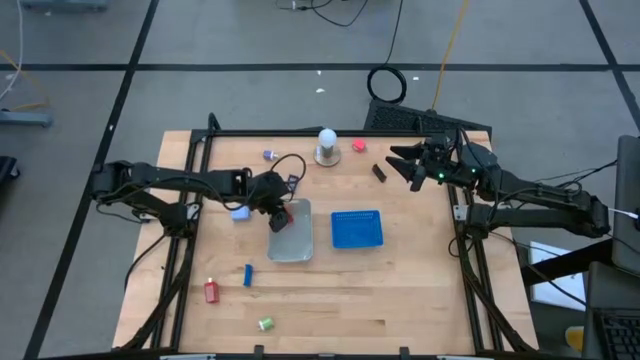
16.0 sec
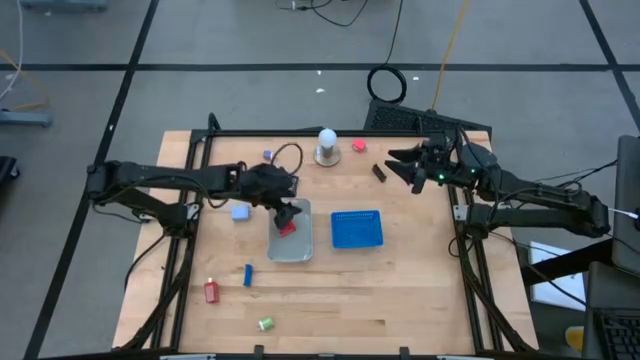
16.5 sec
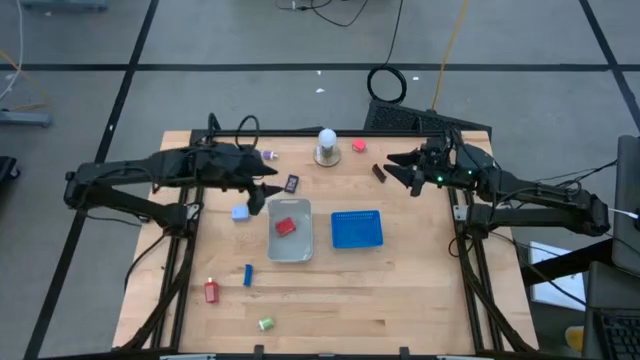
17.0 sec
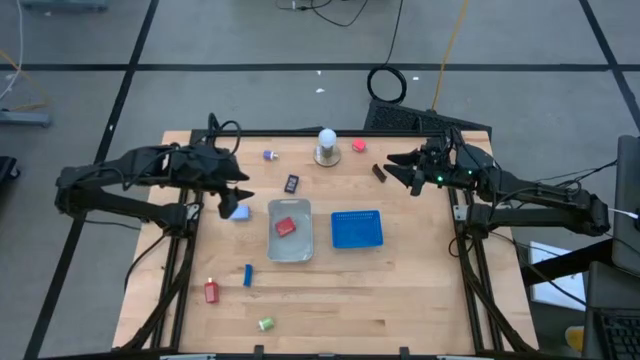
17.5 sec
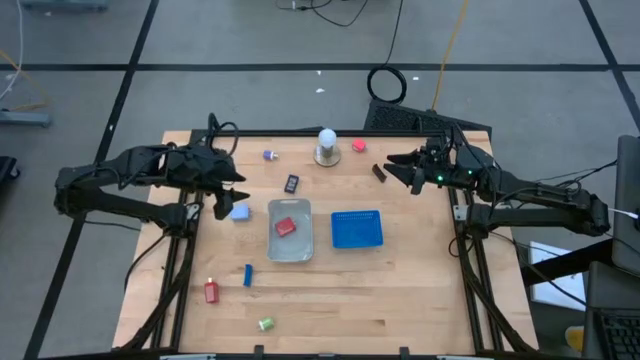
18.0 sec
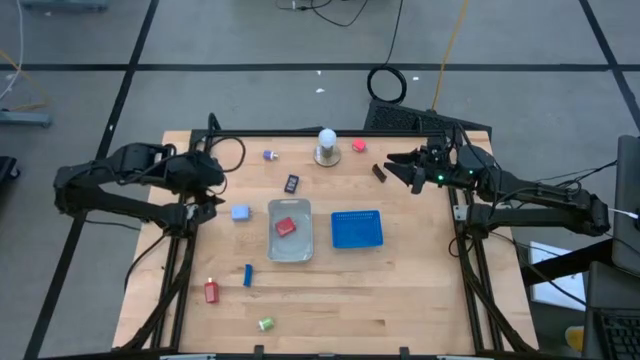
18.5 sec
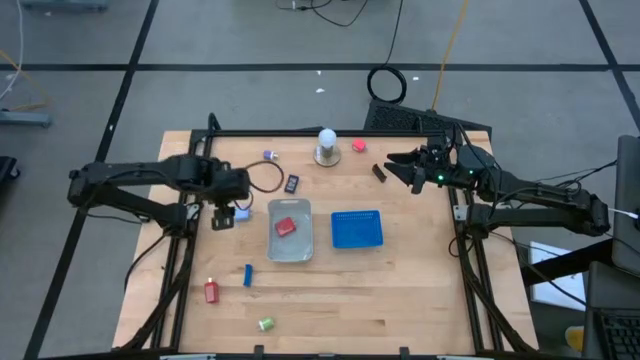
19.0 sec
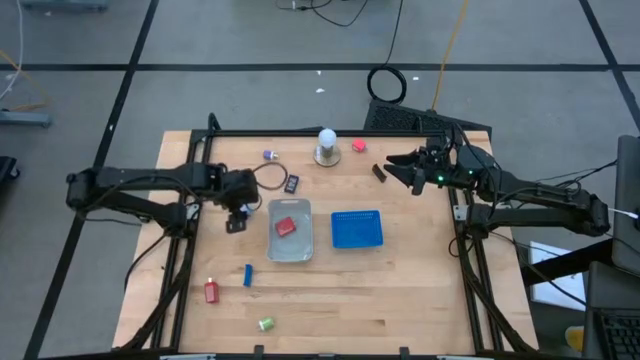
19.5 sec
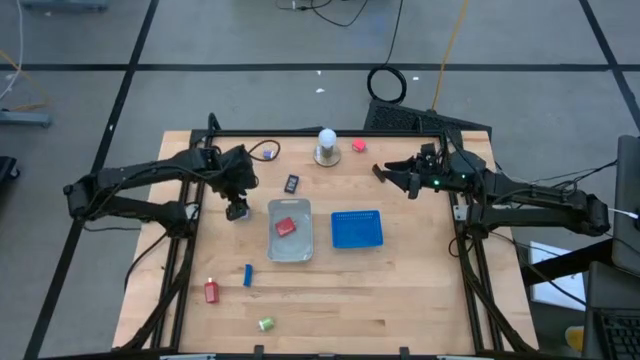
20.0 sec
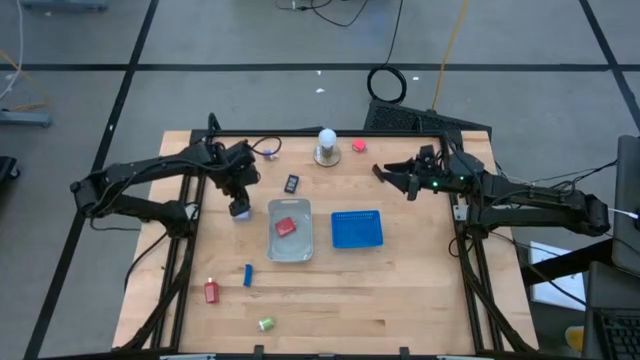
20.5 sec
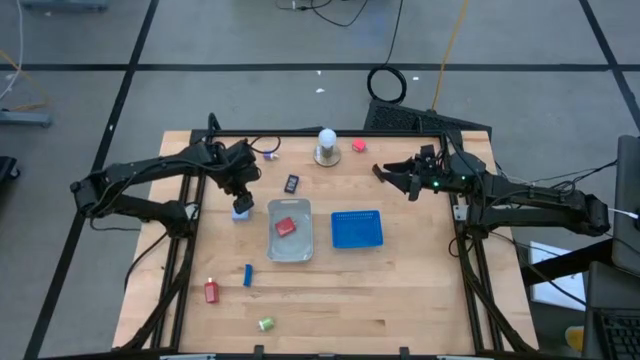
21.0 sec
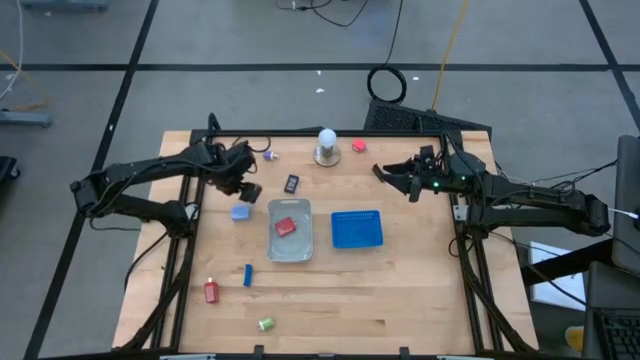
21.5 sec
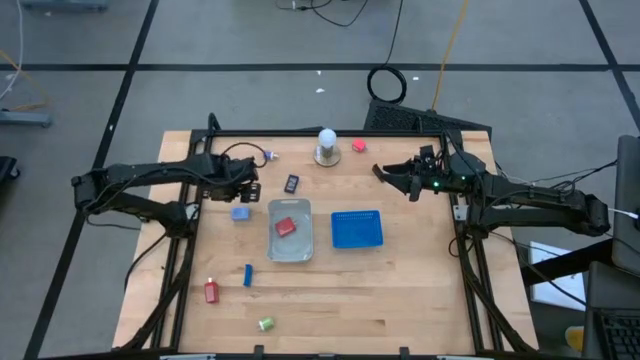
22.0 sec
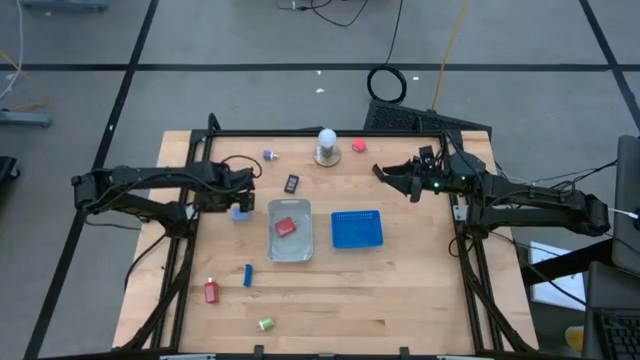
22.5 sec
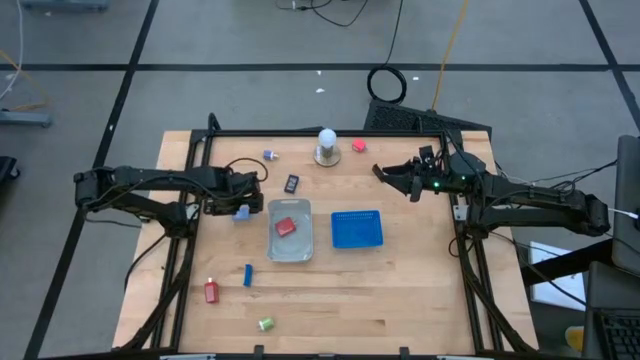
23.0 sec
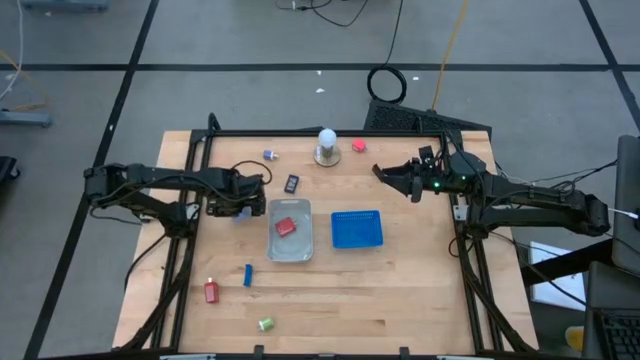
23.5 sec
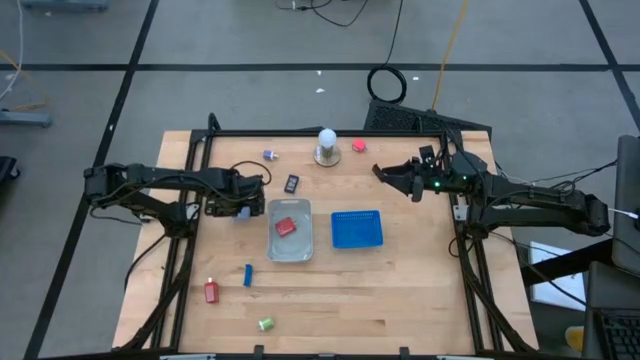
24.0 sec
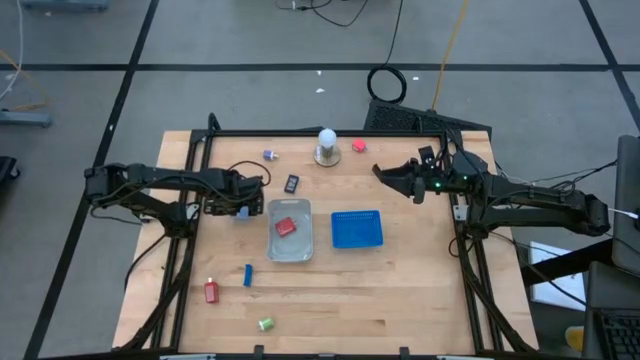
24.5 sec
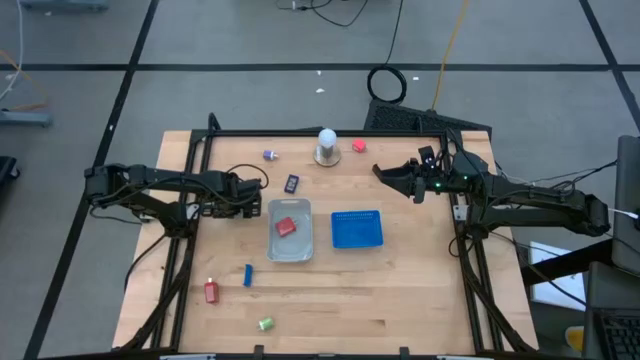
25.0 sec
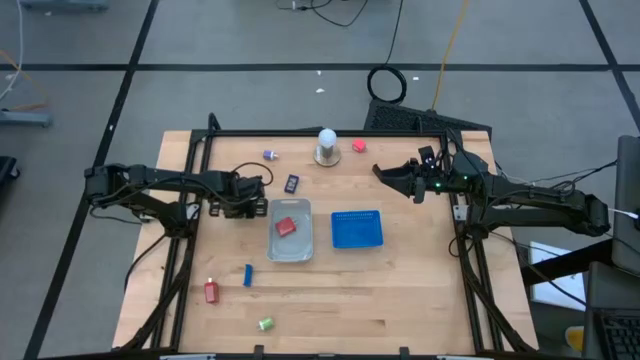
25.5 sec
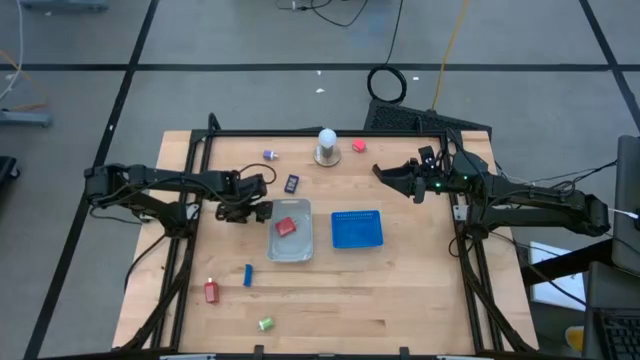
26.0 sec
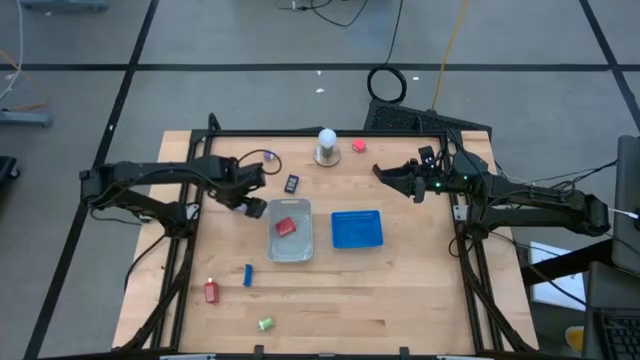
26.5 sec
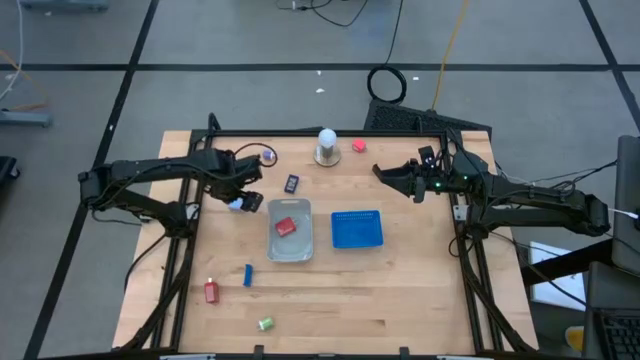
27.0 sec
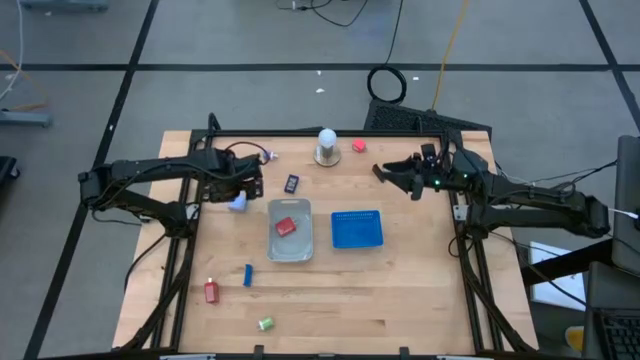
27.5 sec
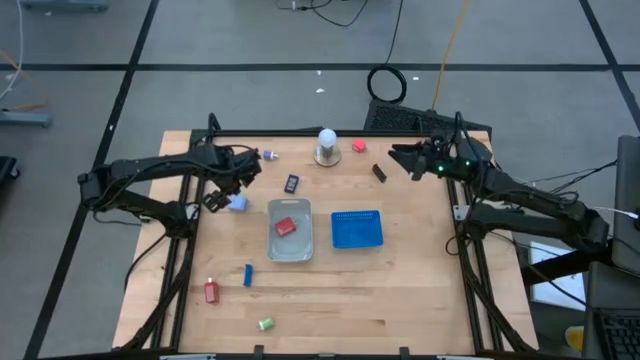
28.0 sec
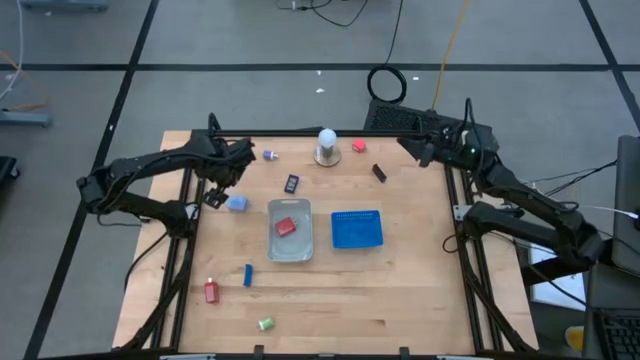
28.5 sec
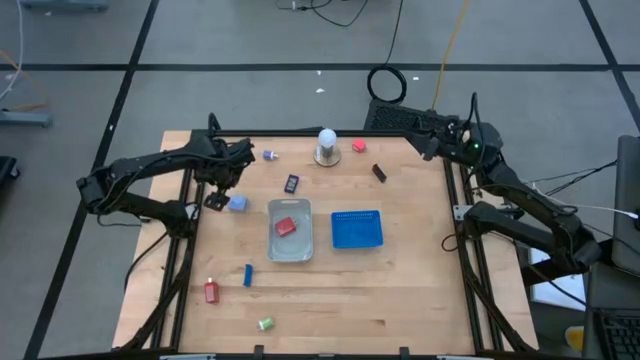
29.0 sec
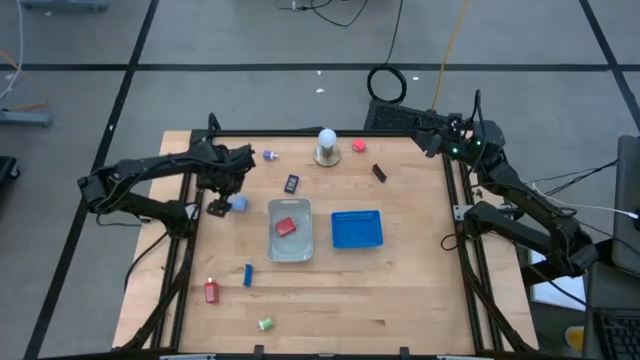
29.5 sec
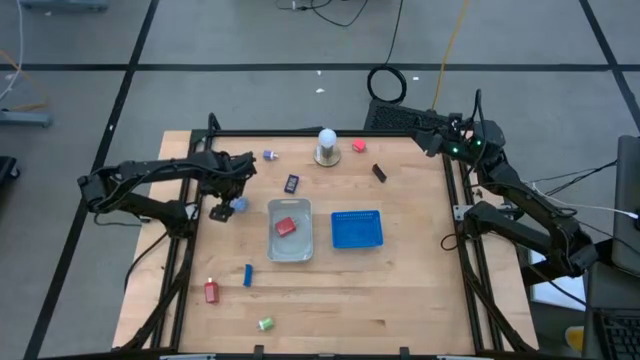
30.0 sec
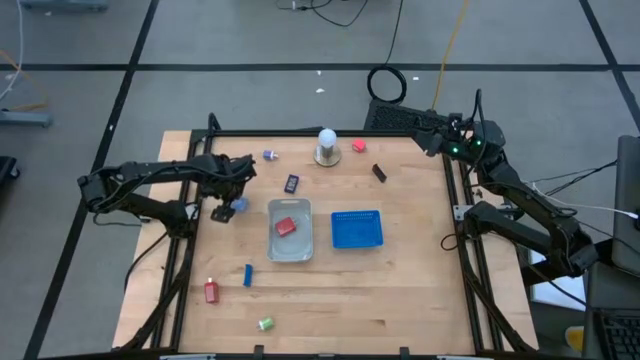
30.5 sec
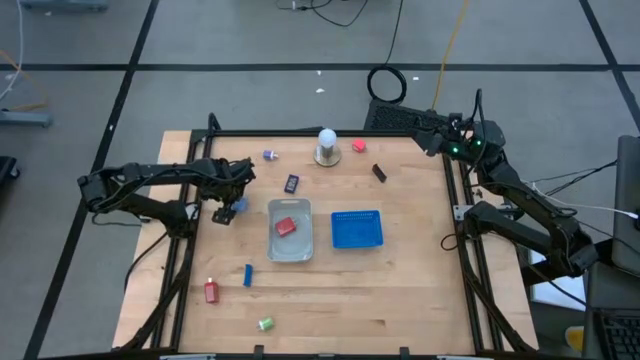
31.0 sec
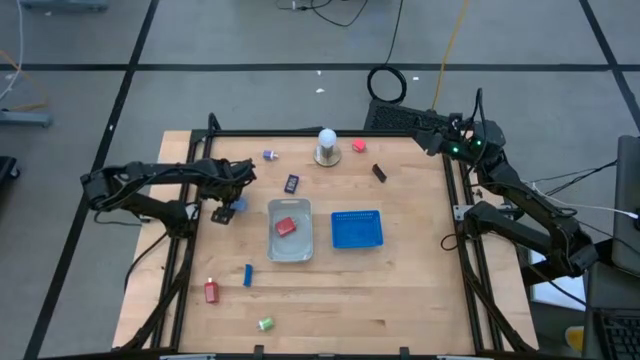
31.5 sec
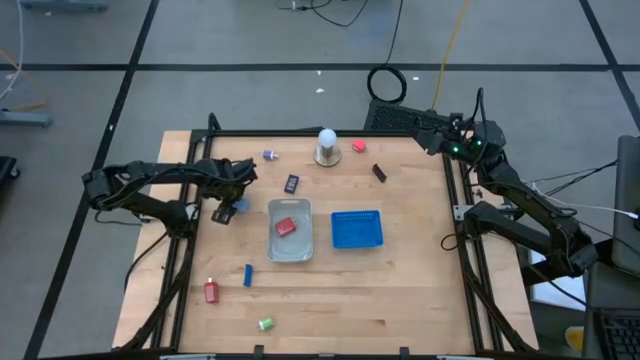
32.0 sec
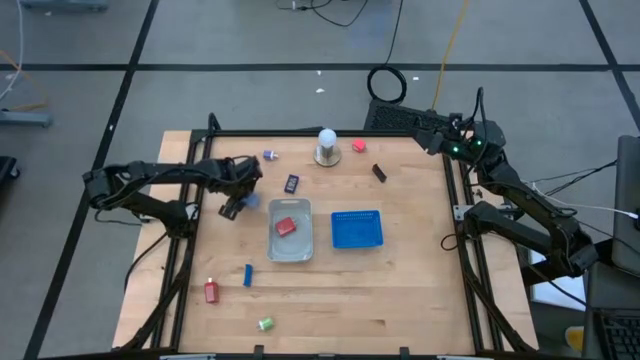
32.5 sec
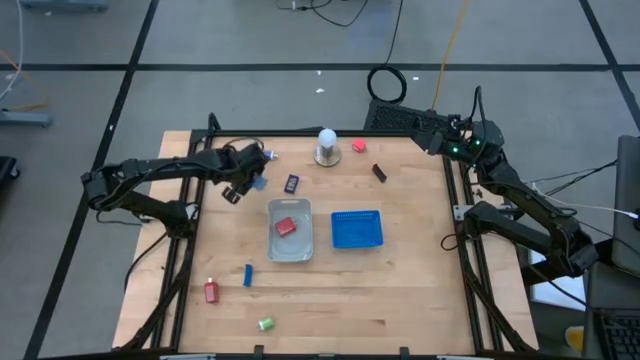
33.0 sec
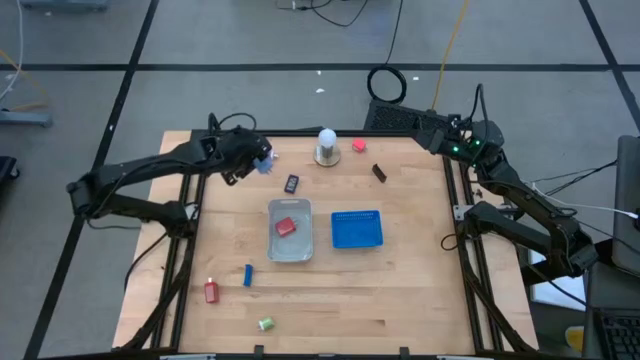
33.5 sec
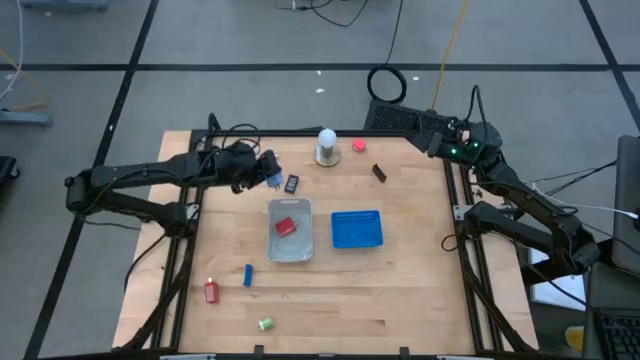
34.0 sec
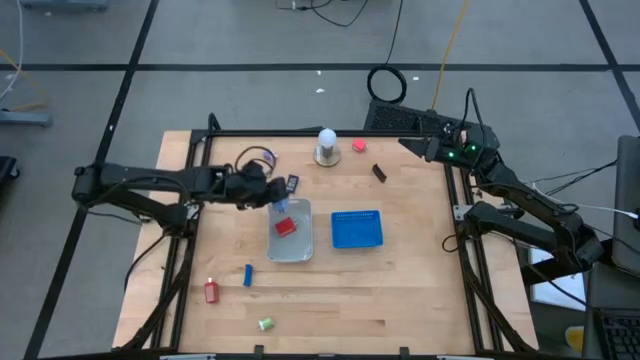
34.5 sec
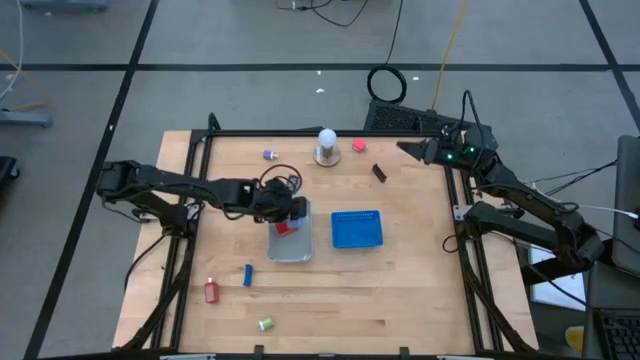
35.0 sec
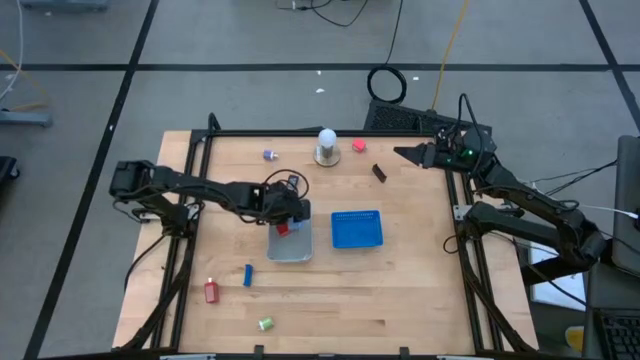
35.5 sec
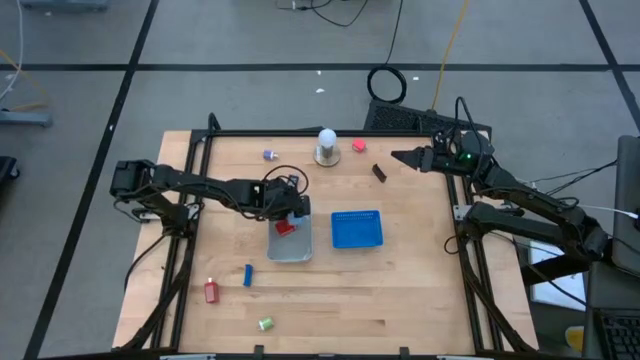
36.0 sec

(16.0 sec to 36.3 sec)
Task: Pick & Place Office items
Put the blue charger adapter into the gray bin

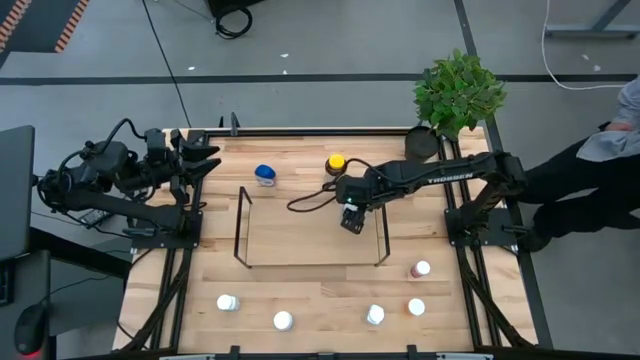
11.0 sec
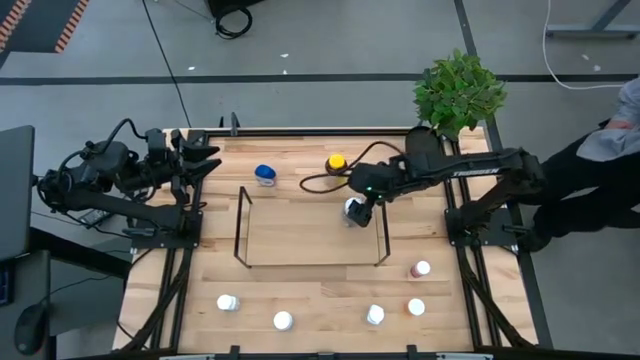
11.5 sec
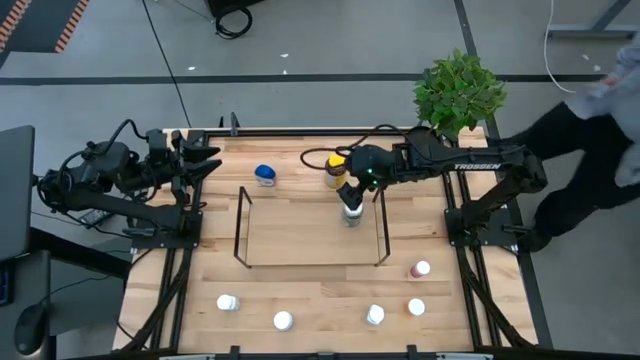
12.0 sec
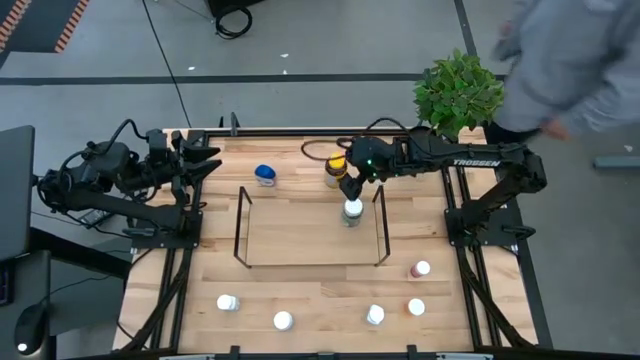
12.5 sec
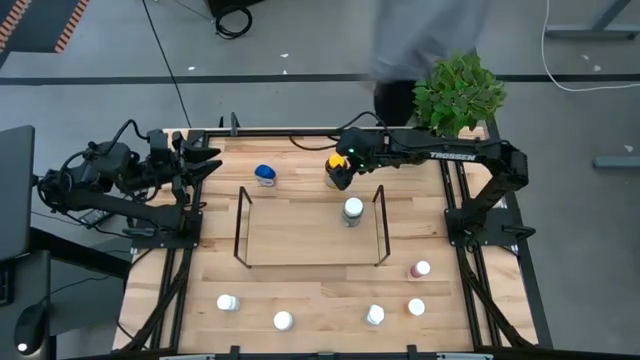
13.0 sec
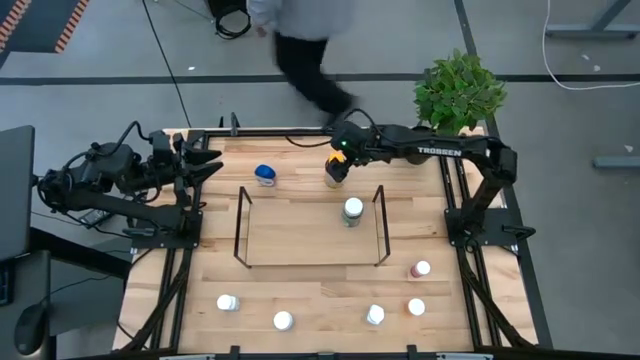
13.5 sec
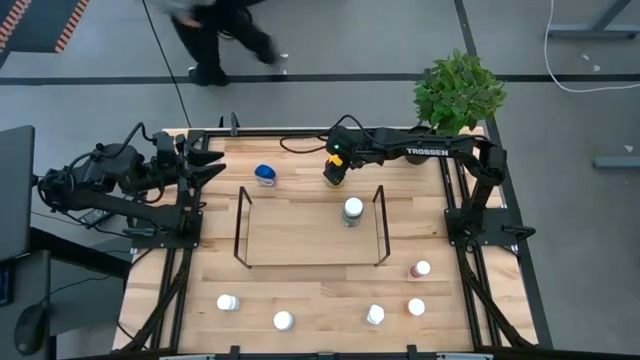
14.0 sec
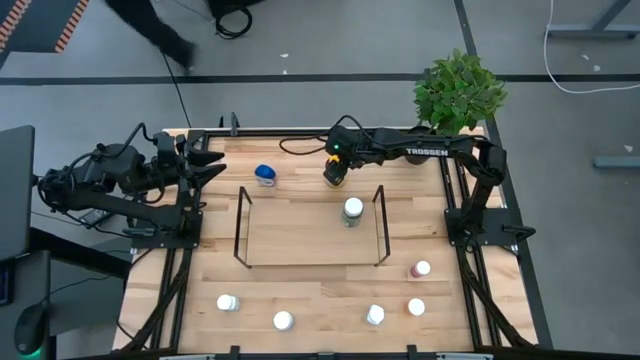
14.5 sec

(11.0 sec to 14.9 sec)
Task: Pick and place medicine bottles onto shelf by color
Put the yellow medicine bottle on the shelf
